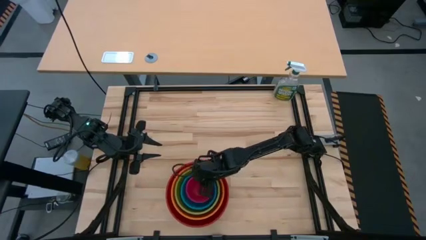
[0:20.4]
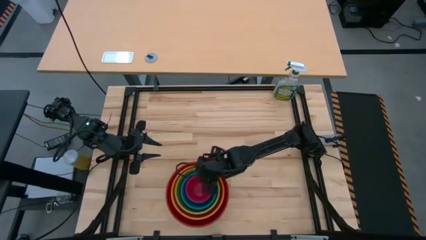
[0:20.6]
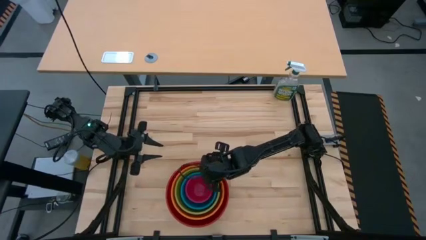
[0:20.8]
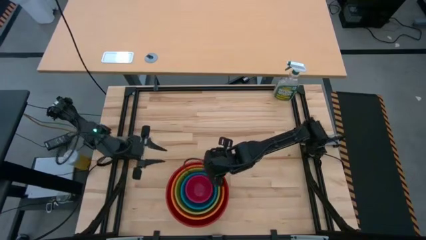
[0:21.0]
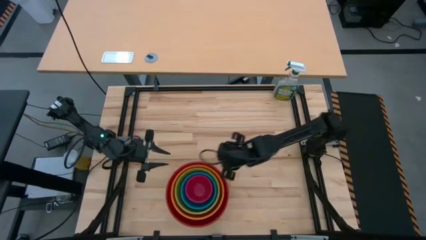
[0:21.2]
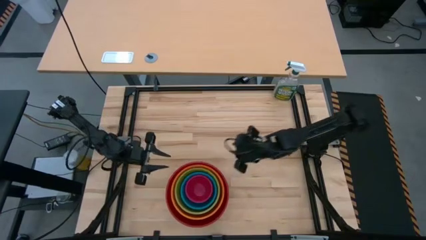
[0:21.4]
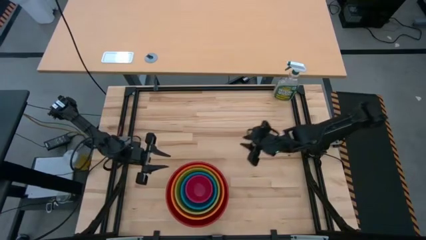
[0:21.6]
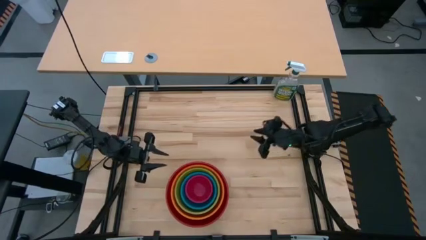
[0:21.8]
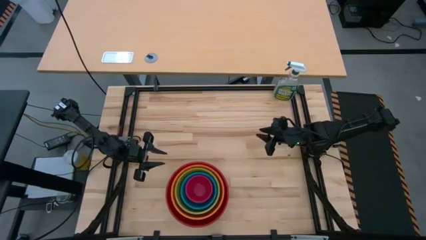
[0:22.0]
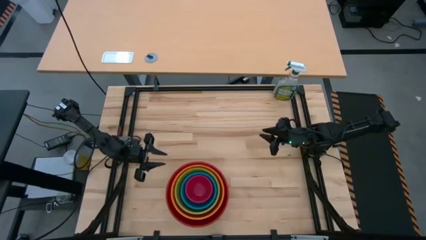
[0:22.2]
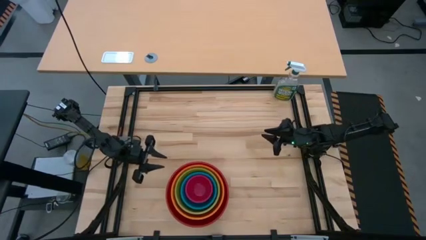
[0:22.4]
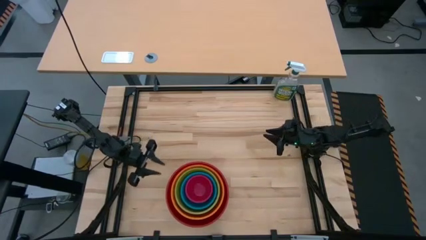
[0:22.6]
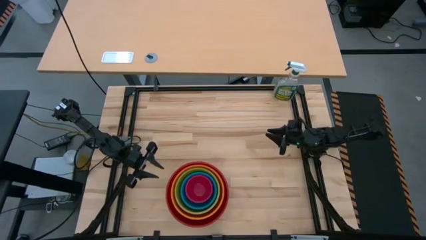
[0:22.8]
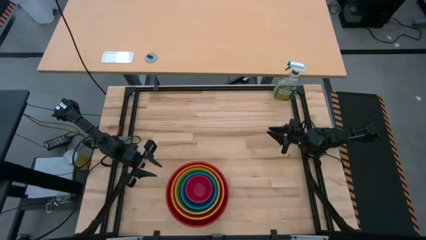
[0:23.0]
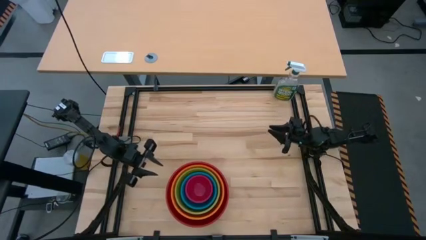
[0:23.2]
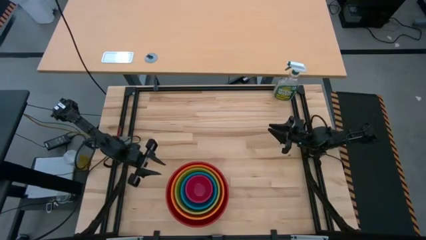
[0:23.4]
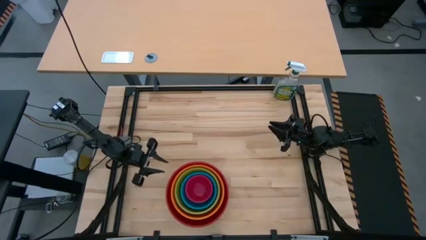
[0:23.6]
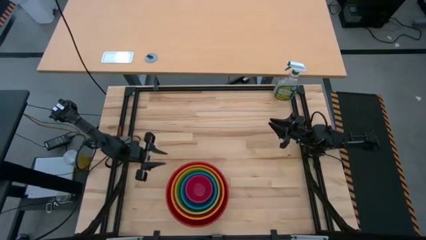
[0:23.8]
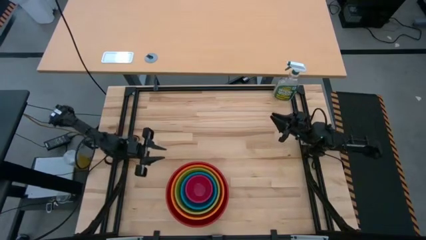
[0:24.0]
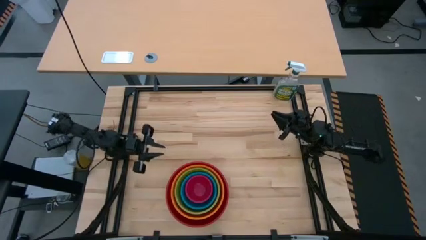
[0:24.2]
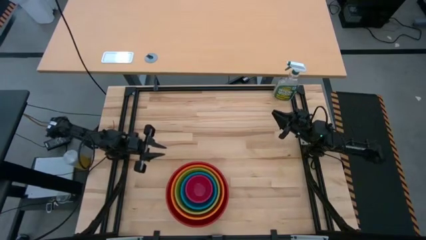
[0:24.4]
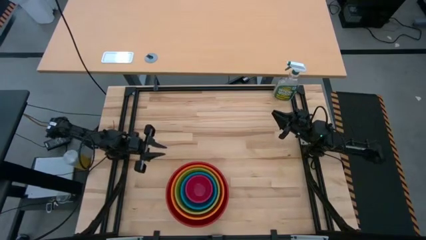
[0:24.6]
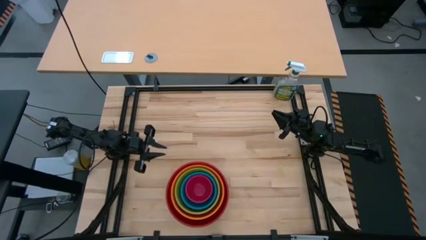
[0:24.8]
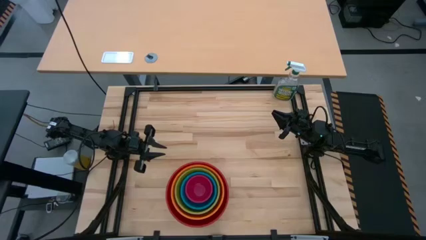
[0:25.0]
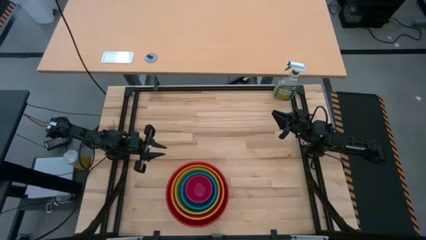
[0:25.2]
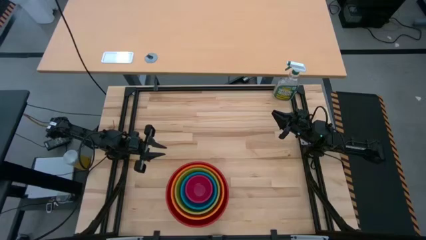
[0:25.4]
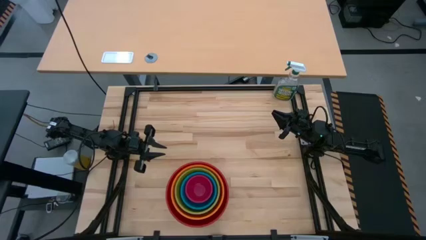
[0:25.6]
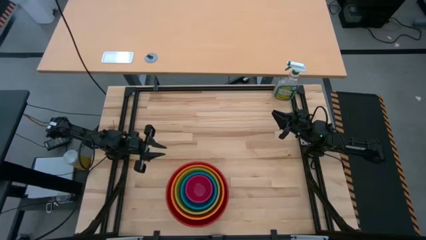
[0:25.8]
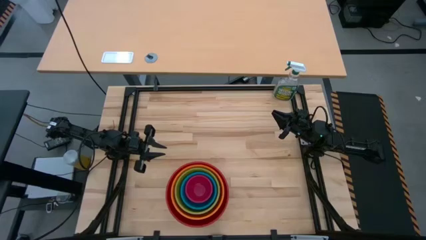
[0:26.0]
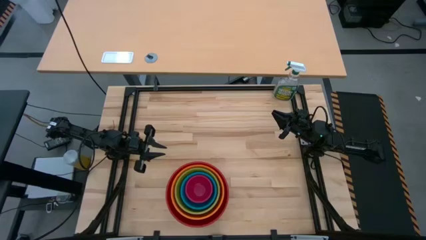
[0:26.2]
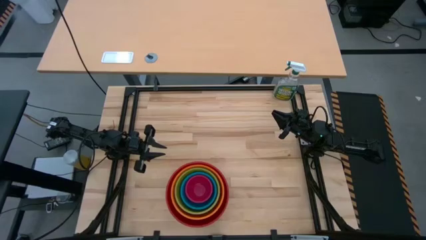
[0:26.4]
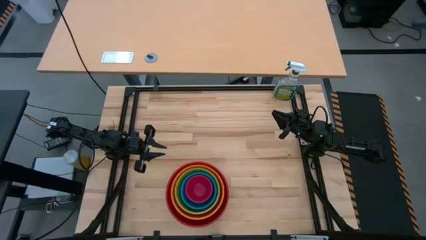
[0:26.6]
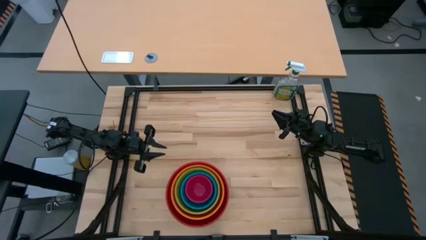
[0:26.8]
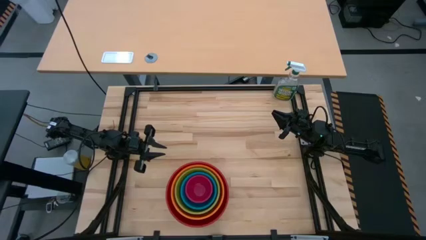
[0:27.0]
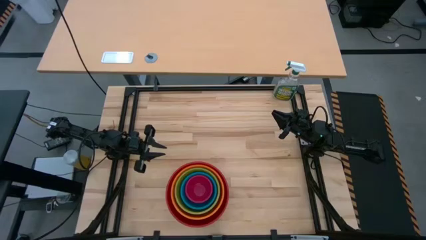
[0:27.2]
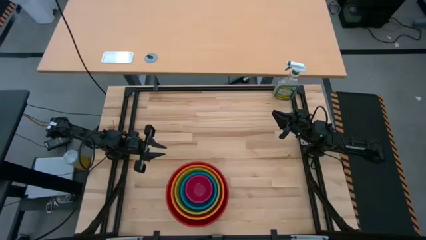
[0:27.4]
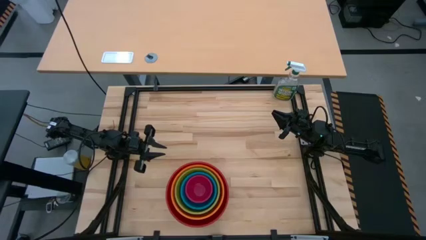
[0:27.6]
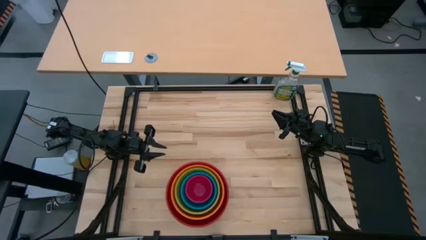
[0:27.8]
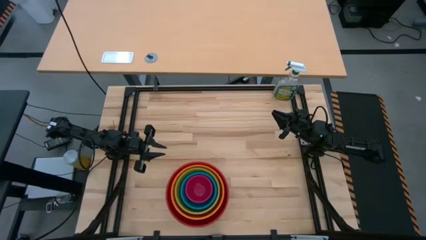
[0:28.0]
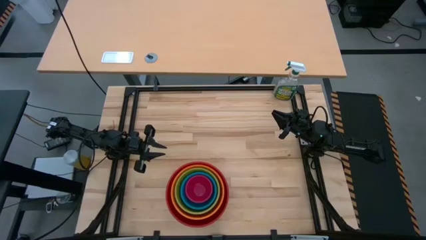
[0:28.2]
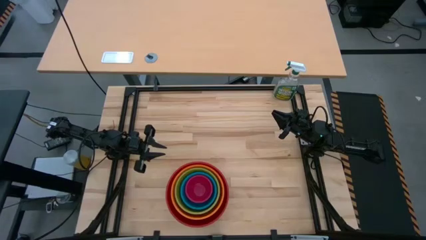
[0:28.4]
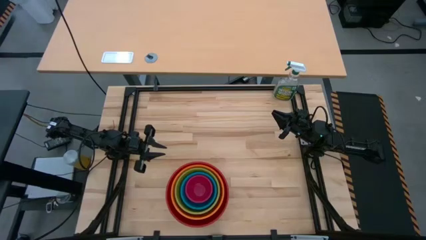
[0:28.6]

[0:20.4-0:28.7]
Return to Home Position

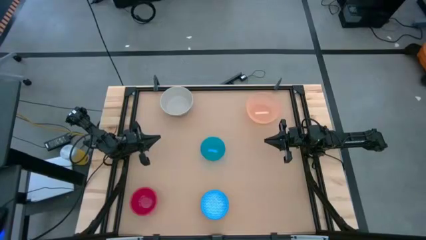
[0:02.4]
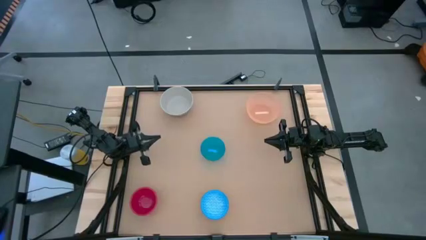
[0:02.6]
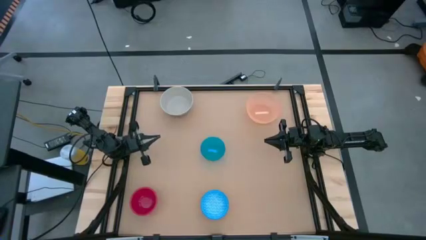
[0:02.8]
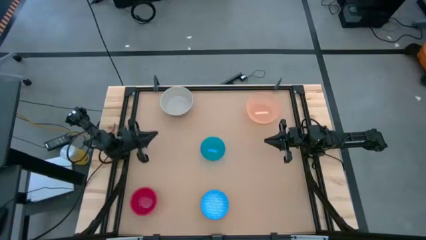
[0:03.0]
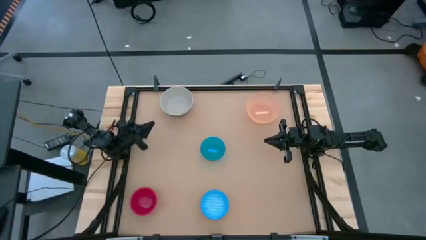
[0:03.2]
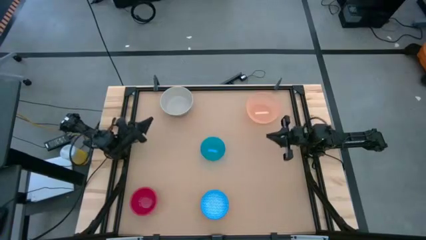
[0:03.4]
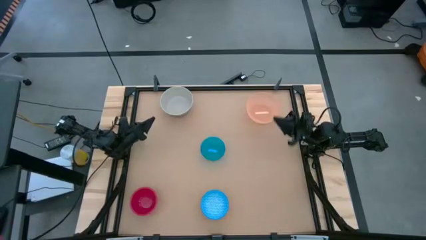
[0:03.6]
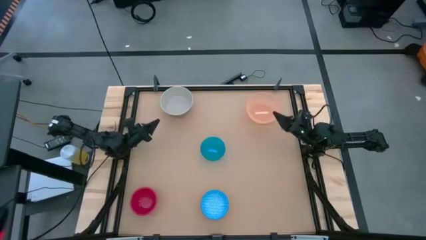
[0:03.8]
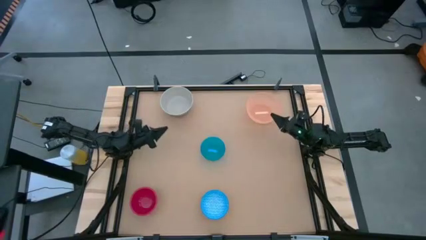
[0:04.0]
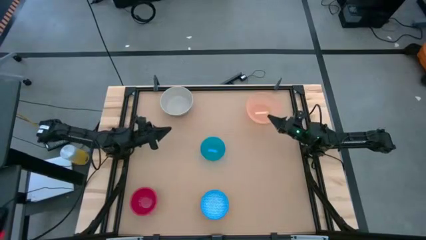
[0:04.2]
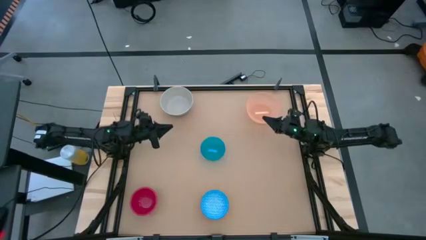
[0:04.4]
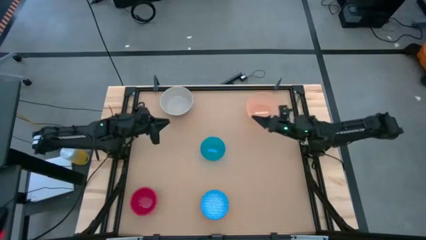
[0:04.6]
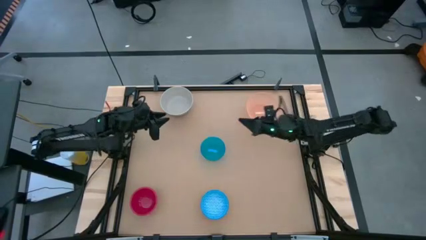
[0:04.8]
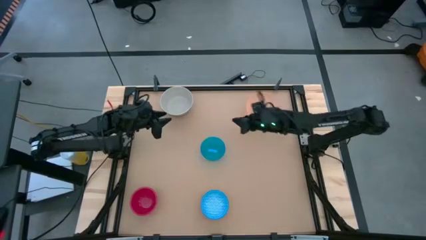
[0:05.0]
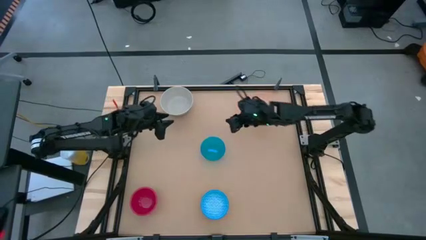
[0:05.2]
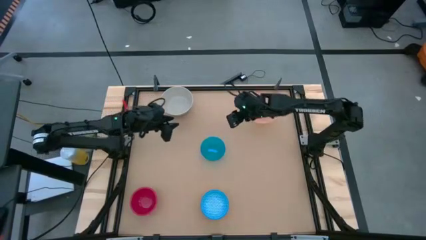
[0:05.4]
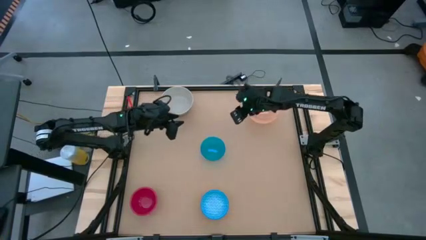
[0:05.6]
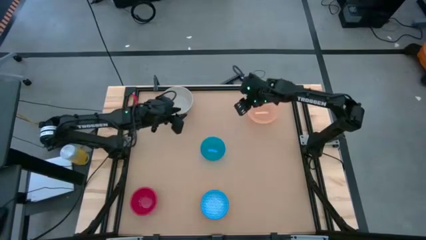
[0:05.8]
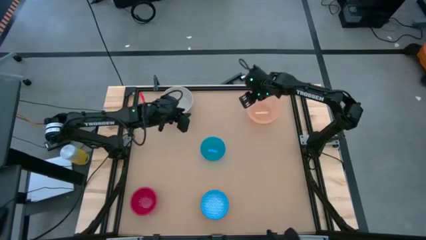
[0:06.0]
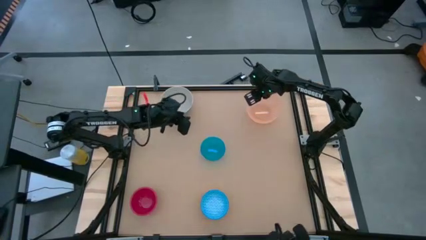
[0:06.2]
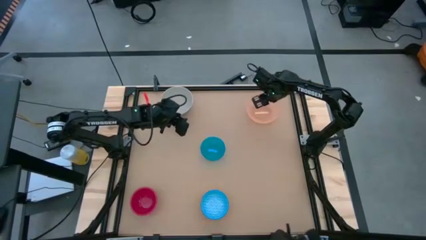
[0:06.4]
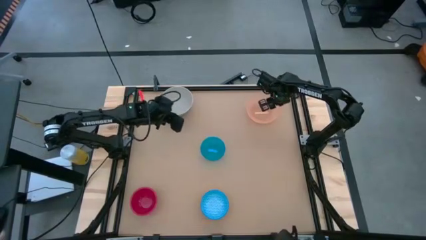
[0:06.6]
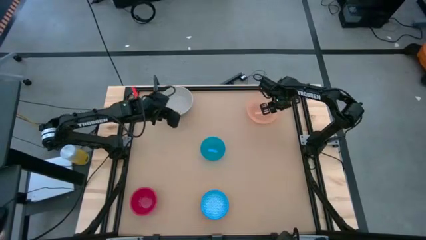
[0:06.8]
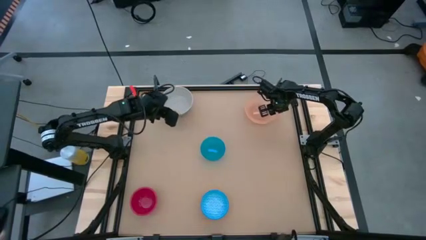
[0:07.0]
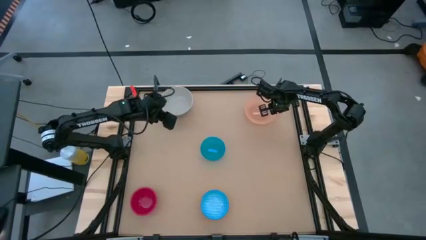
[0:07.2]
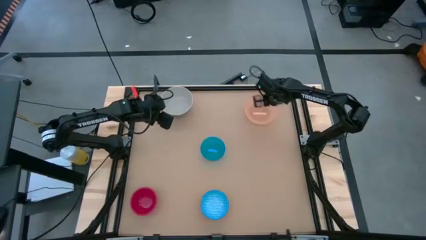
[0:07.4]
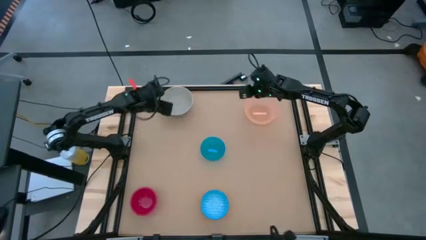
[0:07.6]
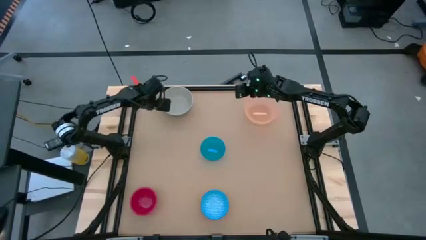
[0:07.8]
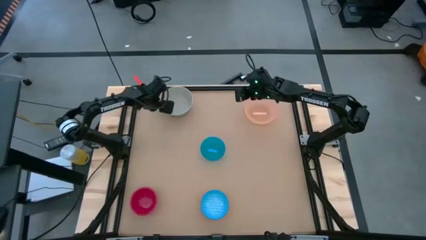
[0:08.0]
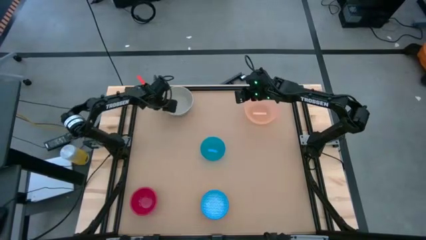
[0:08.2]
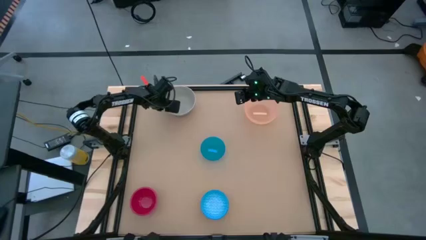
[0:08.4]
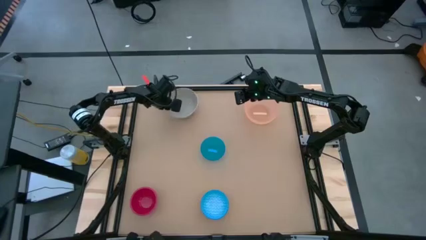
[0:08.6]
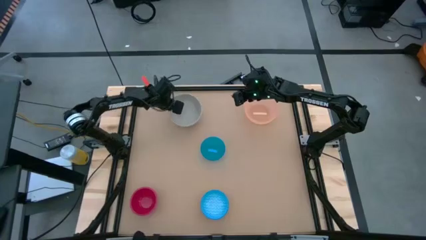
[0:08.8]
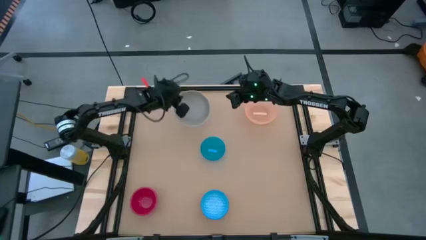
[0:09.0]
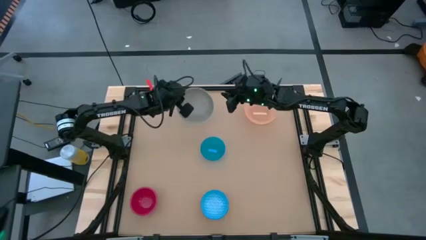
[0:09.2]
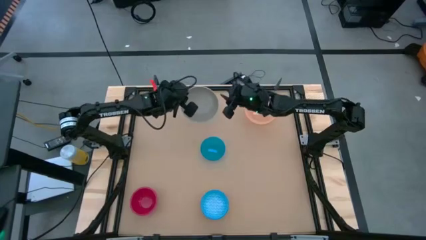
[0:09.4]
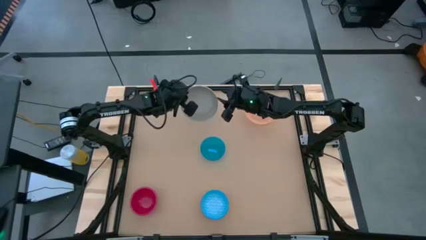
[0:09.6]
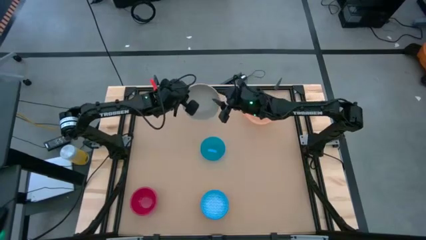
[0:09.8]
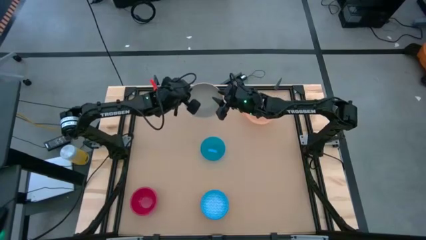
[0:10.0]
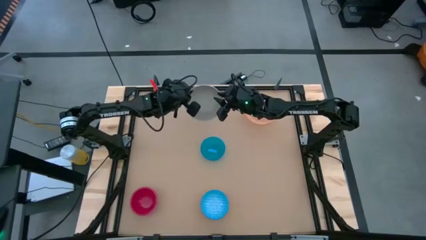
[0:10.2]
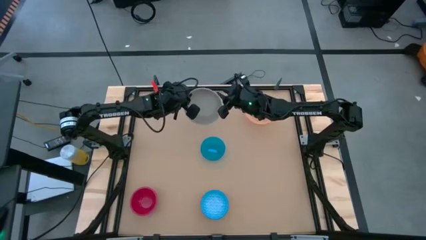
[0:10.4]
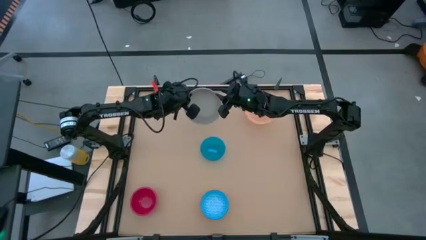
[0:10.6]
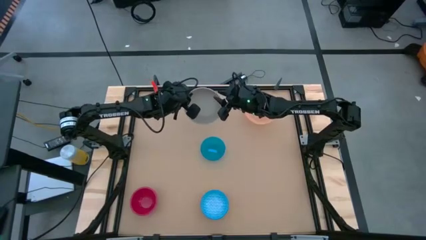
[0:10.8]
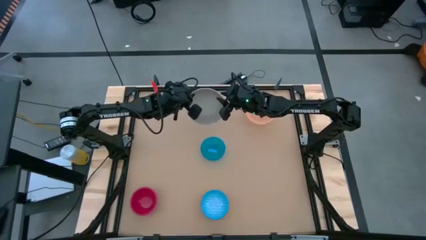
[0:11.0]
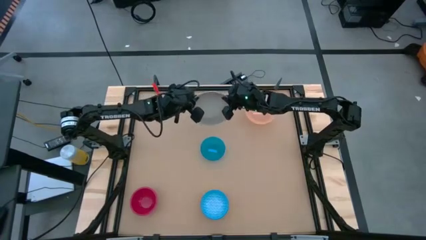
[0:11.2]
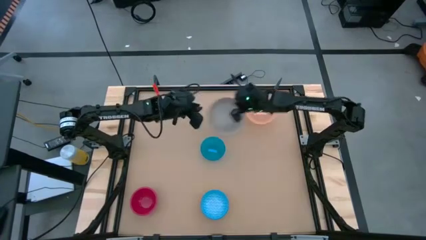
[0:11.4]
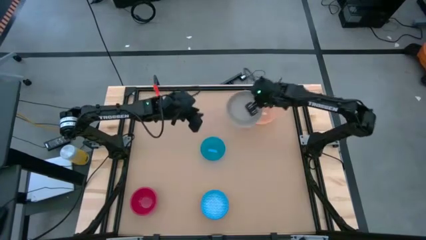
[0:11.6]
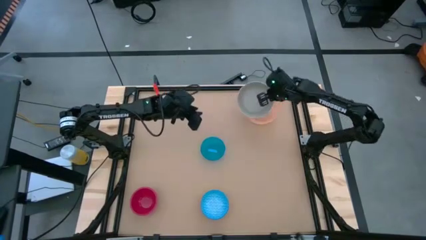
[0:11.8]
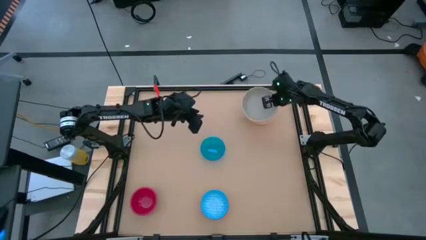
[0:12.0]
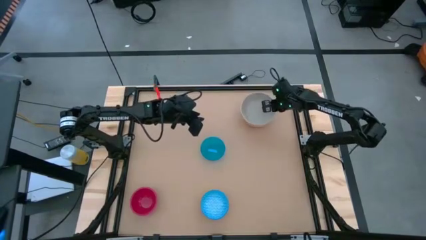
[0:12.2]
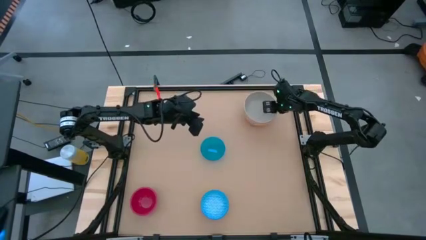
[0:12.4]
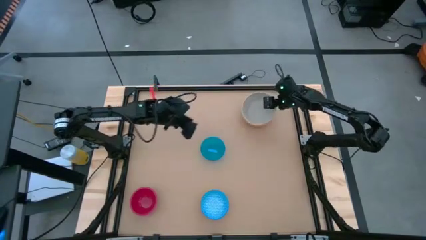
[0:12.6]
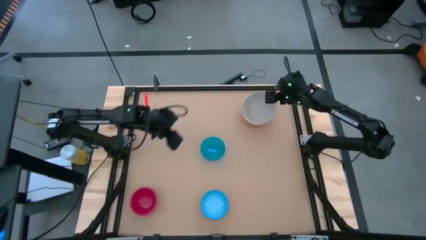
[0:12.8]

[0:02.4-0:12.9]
Stack the white bowl on top of the orange bowl
